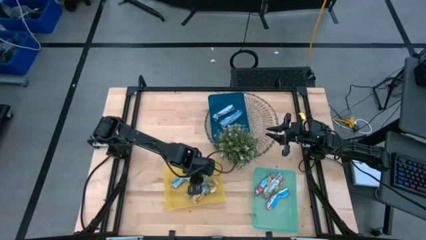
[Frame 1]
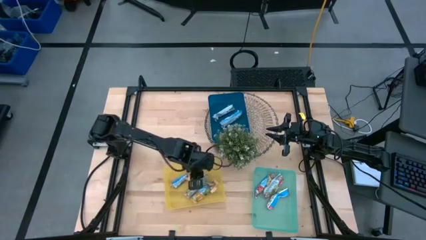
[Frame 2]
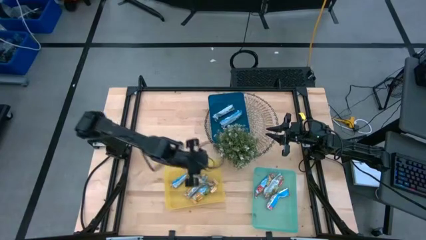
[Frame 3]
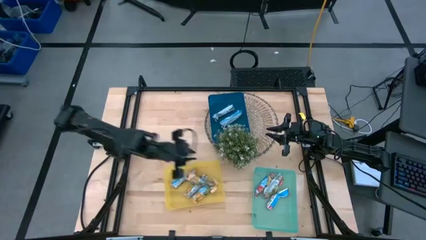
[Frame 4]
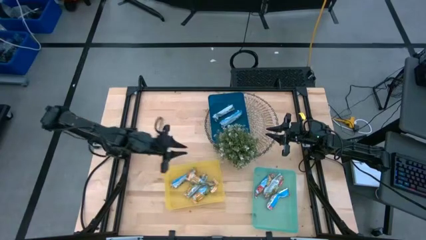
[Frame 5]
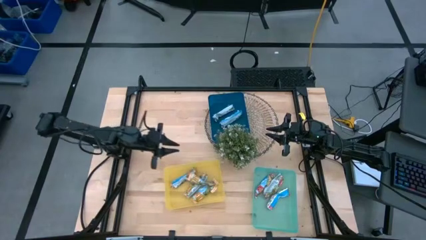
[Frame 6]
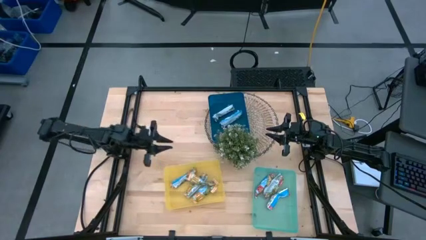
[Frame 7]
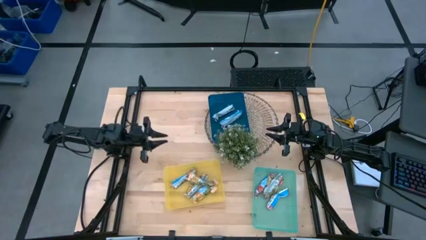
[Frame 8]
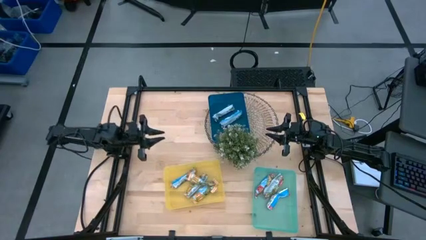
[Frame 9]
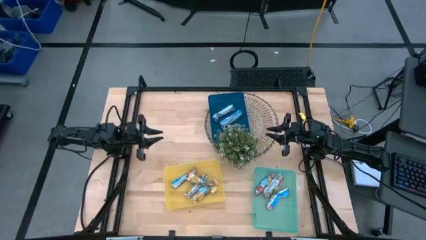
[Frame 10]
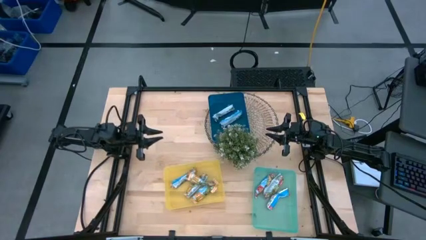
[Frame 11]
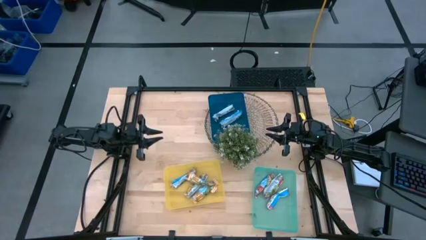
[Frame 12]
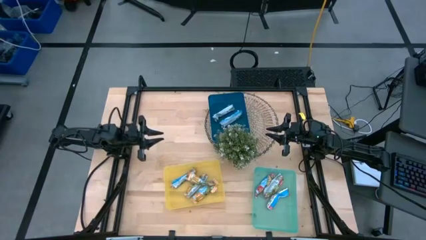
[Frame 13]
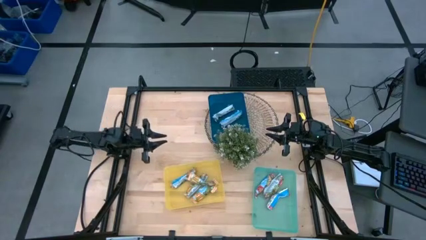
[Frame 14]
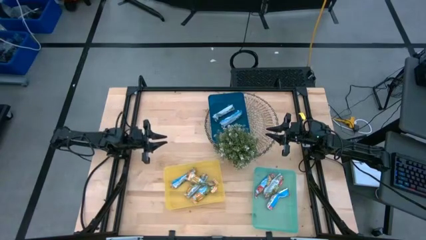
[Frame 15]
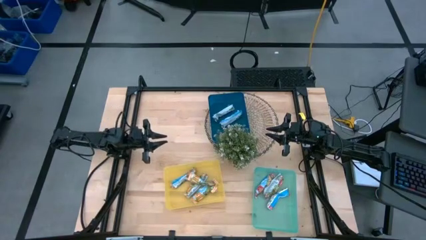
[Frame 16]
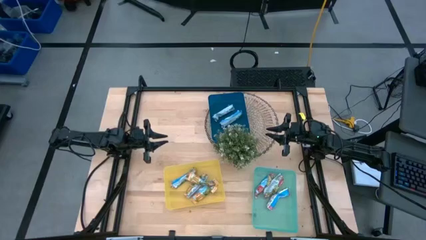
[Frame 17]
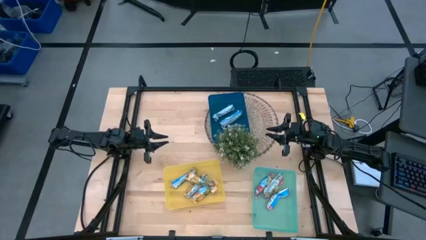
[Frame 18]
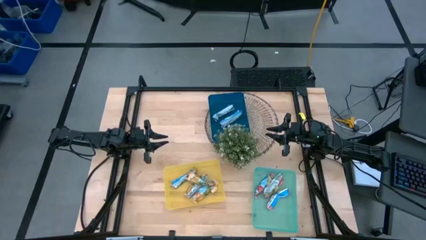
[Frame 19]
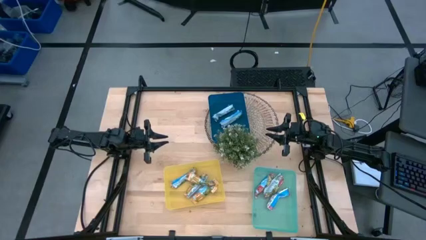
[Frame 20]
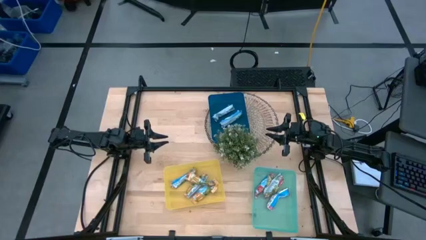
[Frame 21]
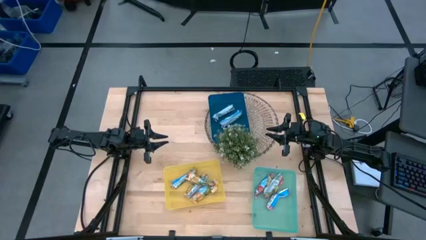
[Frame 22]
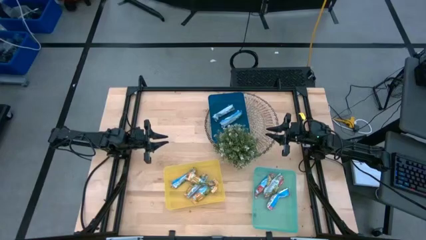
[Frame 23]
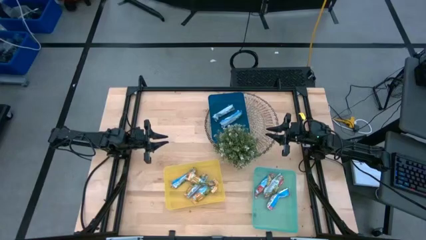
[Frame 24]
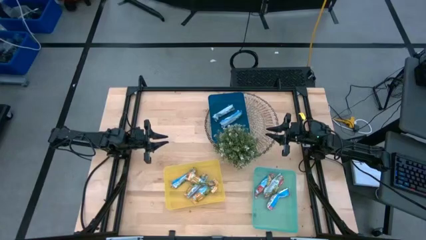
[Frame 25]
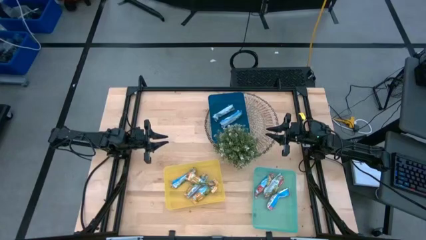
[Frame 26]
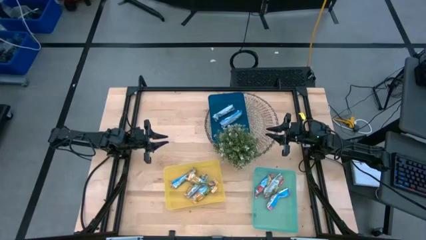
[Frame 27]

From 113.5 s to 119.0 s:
Task: Pick and place Granola Bars by type
Return to Home Position

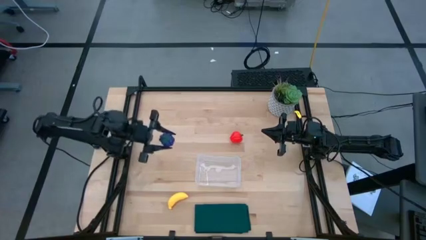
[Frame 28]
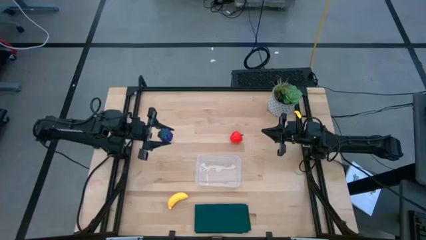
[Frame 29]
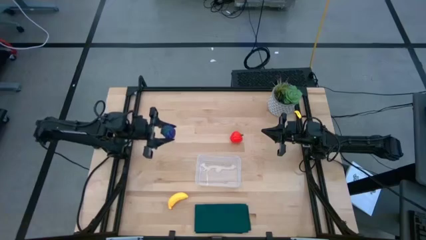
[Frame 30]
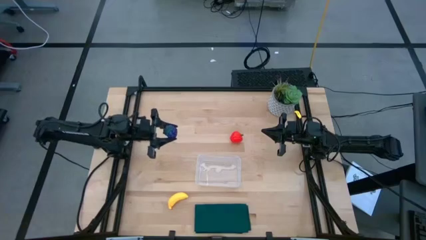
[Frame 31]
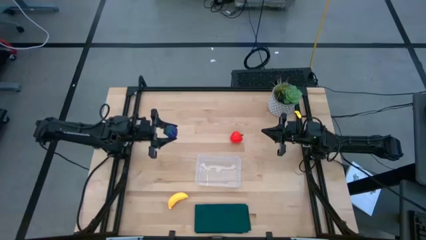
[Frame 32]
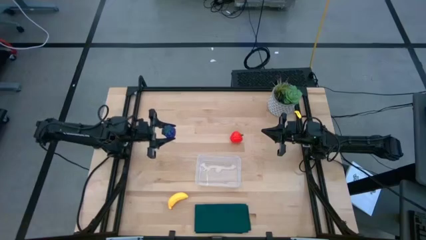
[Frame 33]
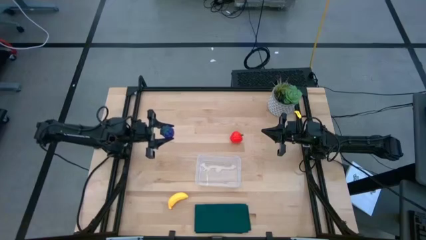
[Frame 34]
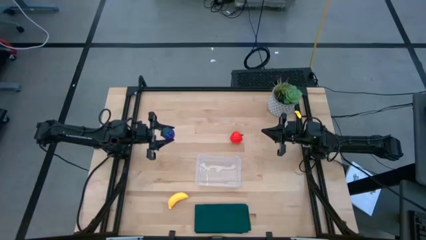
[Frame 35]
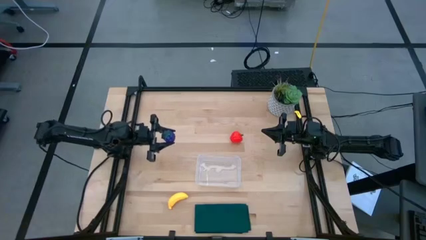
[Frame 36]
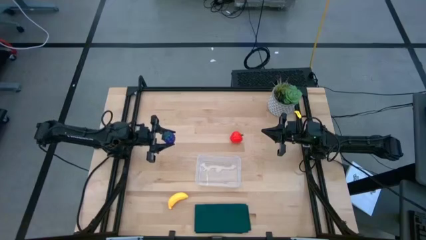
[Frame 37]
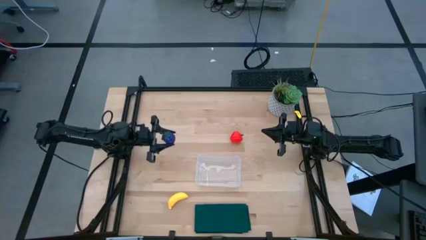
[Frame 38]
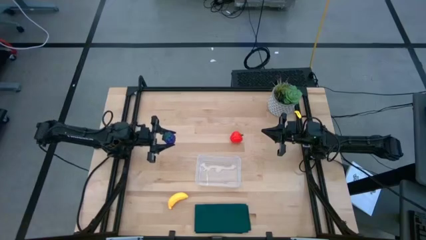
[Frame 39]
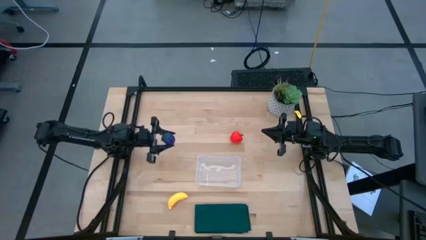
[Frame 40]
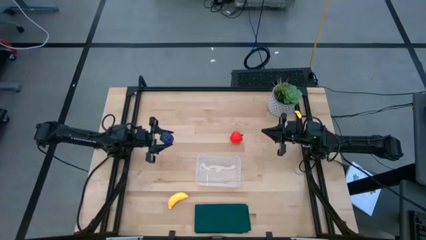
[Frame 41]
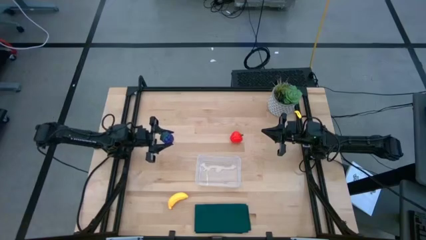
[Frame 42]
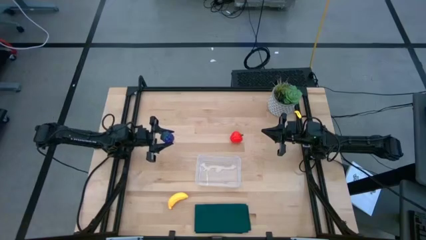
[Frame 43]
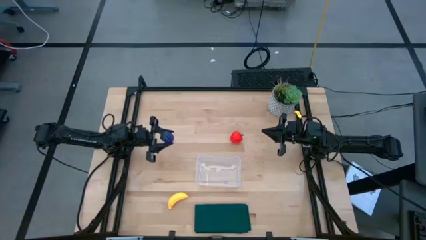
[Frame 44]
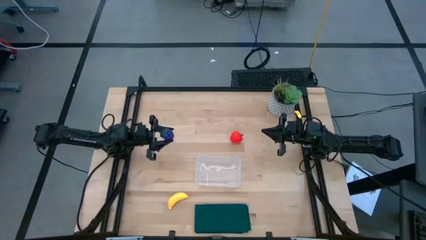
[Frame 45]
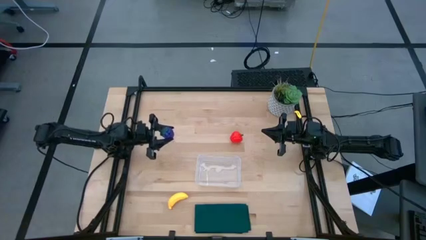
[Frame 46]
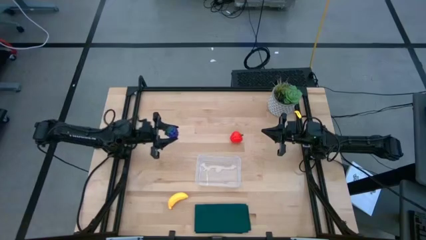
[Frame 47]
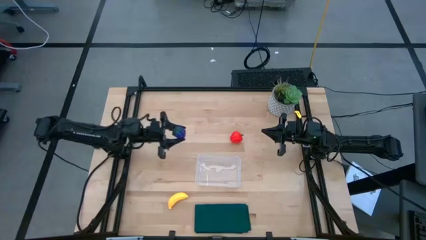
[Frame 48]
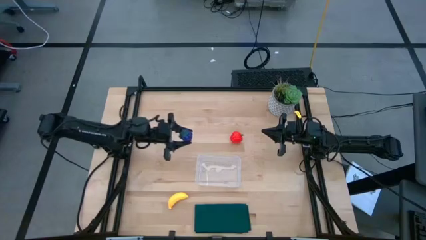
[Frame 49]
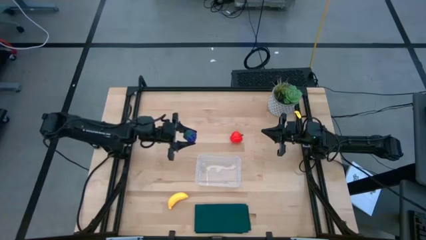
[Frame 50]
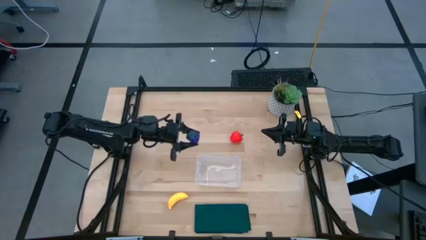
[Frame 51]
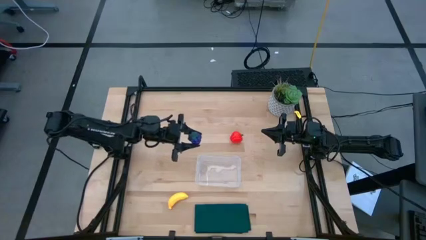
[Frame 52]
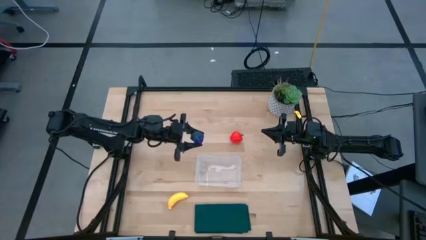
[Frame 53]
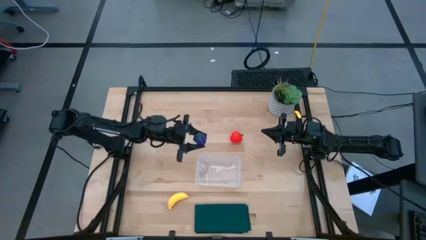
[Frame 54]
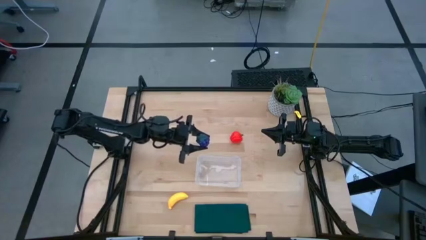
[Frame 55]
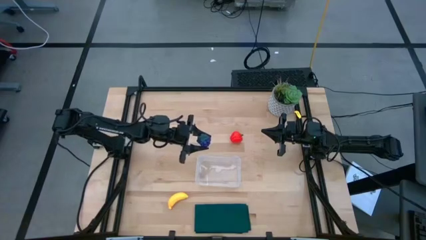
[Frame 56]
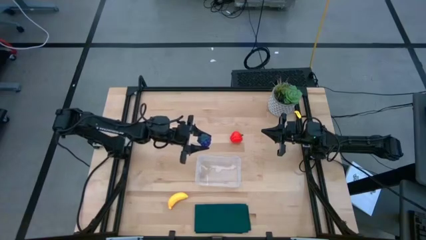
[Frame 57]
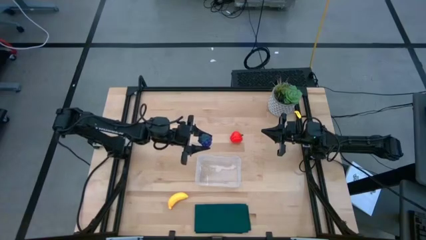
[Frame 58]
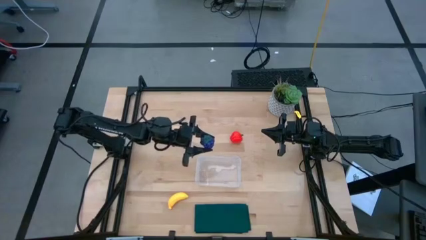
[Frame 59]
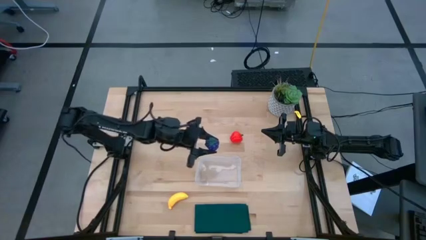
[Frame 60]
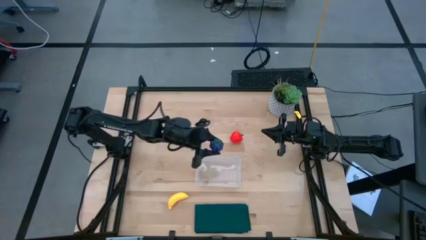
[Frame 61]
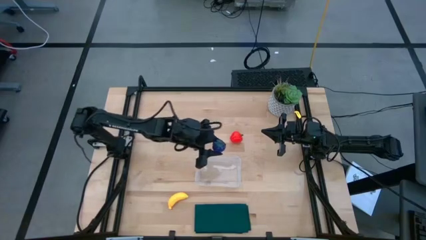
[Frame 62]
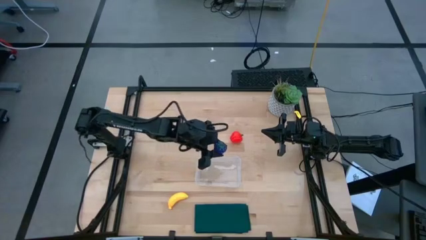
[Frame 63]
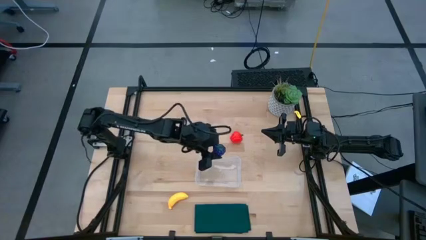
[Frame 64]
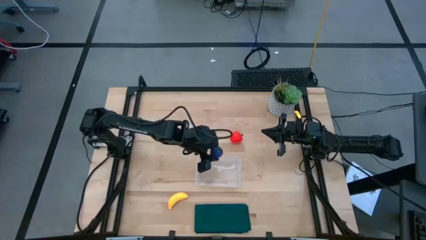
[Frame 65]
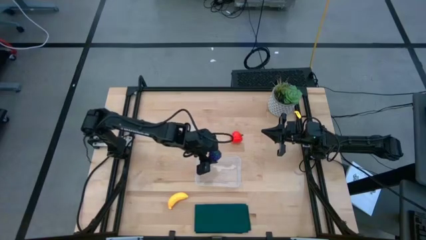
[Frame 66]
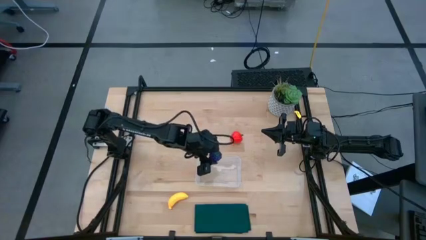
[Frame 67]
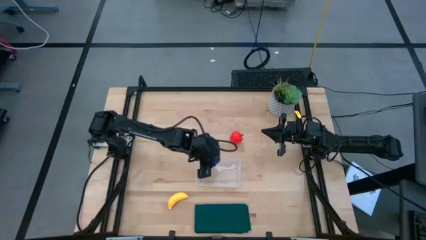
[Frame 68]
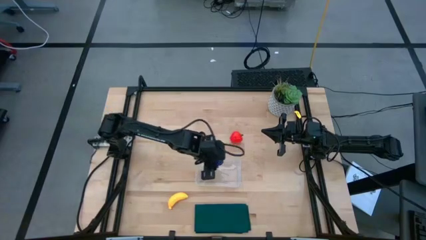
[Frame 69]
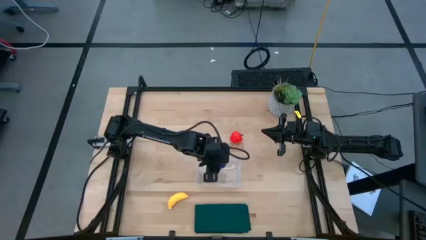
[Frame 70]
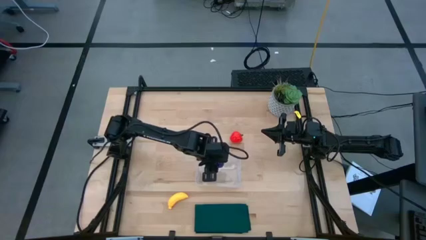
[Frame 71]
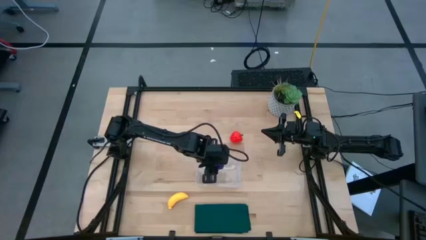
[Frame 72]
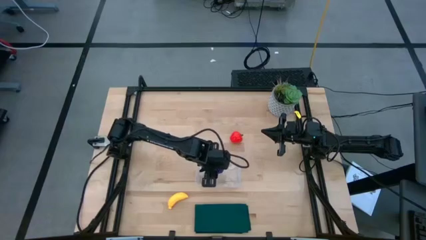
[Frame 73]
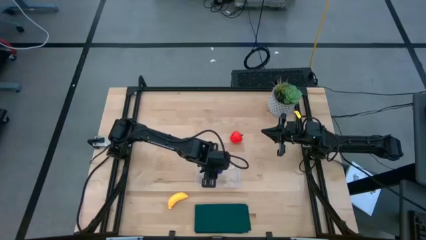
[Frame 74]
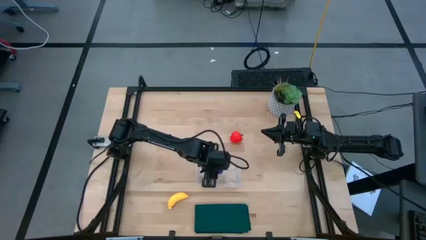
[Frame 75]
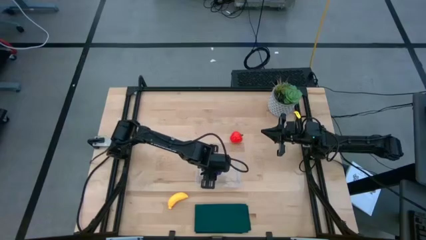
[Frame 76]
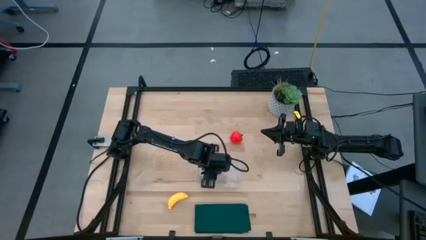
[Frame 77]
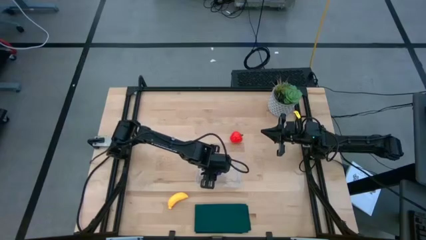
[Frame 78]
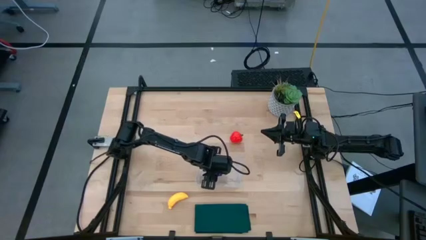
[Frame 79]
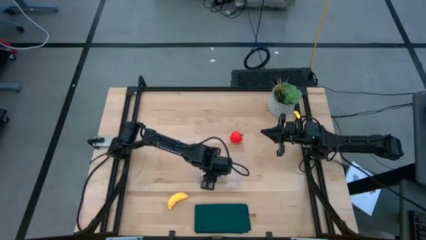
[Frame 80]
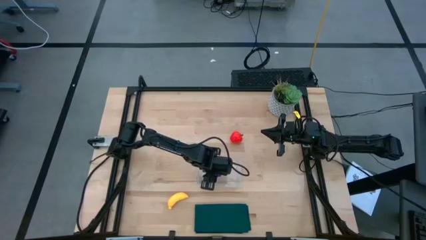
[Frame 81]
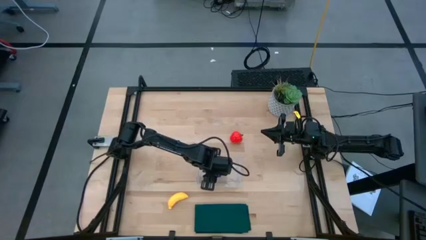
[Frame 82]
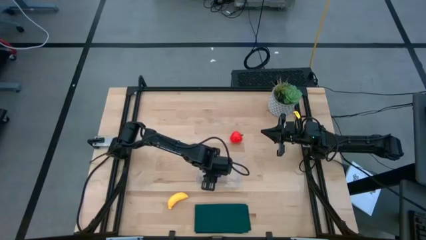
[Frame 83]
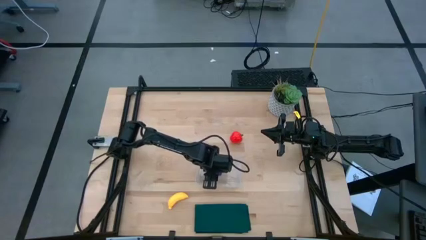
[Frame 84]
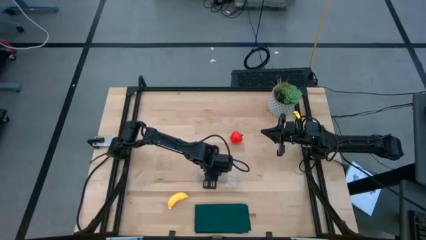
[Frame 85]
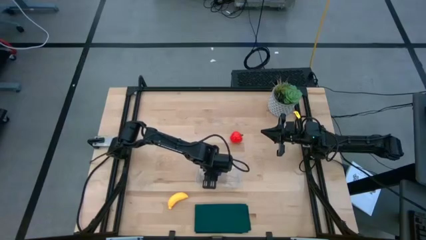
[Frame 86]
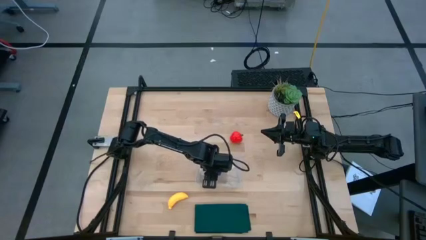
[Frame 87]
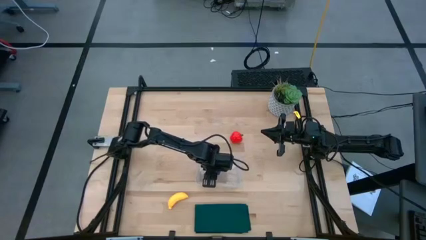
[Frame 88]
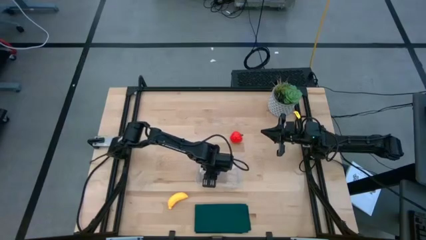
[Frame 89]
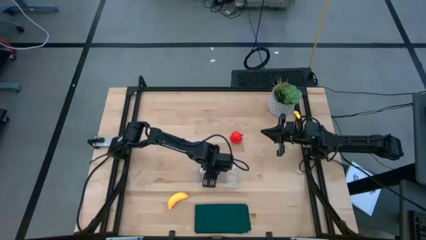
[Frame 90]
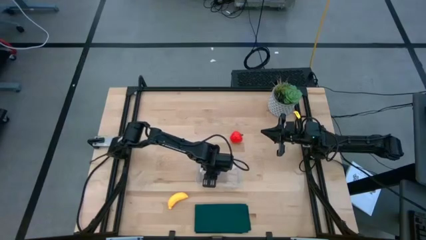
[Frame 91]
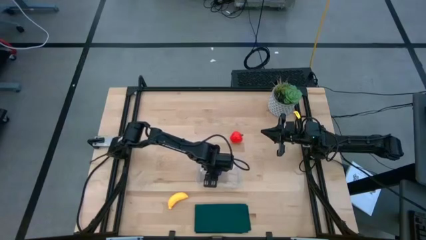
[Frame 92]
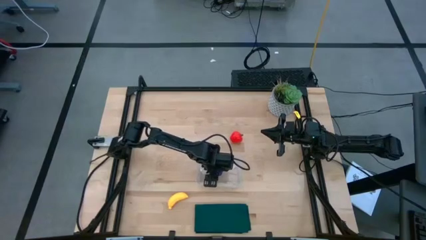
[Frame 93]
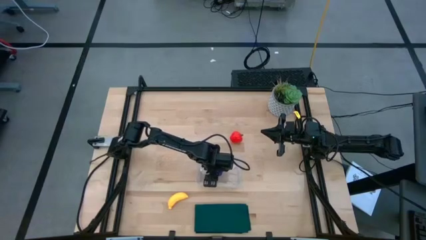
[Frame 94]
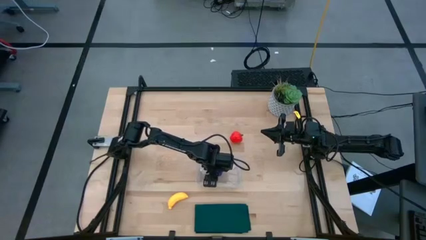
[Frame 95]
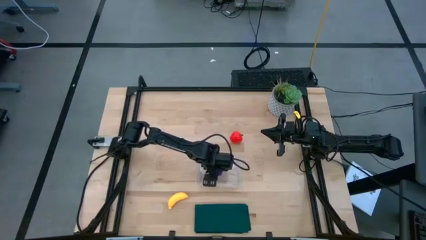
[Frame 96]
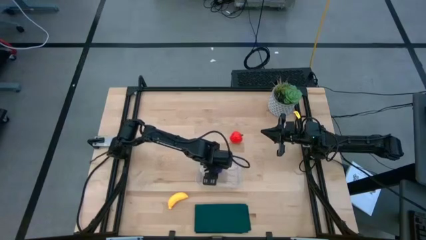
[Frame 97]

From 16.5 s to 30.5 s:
Task: Pick and placing Produce into tupperware
Put the grapes into the transparent bin
